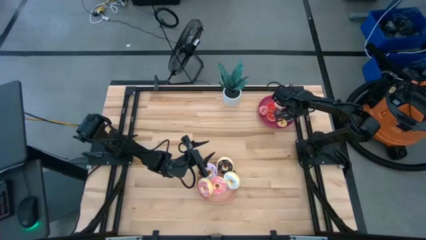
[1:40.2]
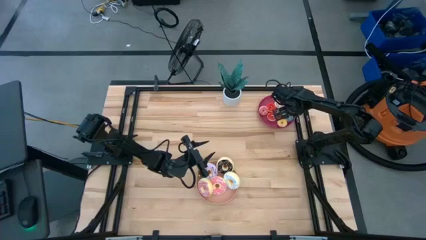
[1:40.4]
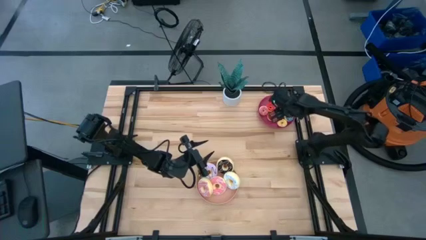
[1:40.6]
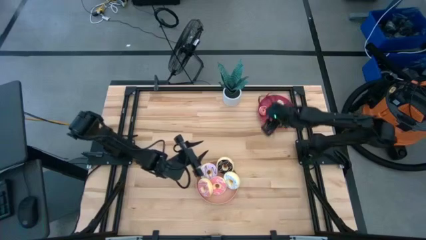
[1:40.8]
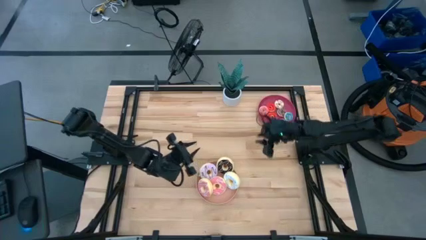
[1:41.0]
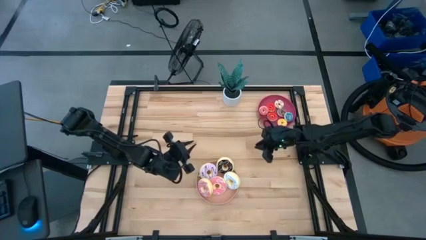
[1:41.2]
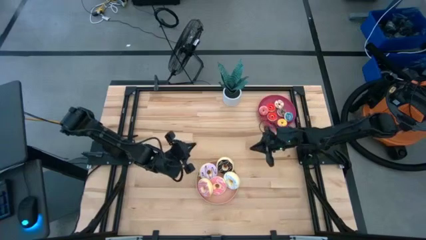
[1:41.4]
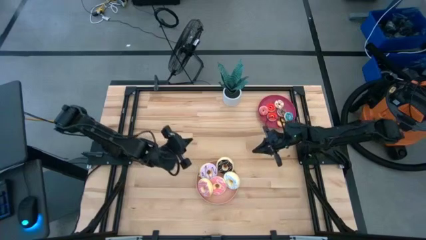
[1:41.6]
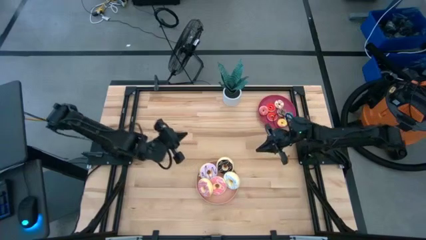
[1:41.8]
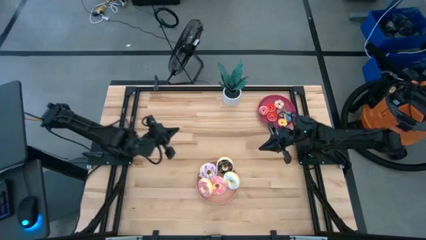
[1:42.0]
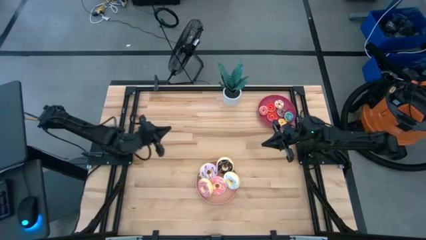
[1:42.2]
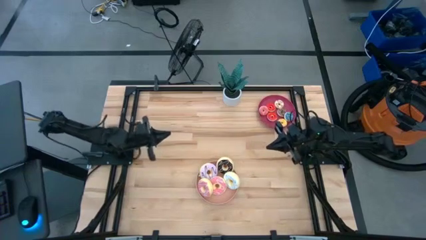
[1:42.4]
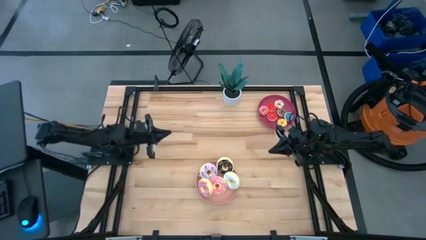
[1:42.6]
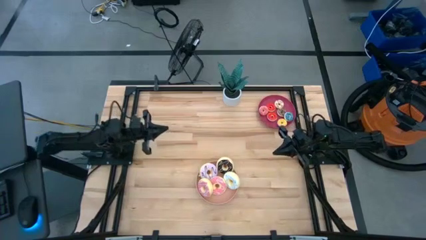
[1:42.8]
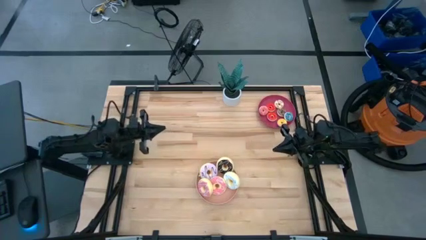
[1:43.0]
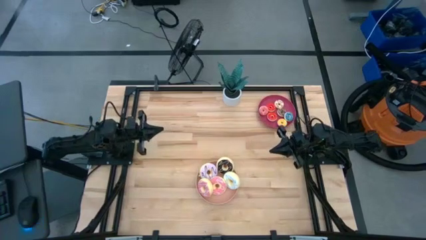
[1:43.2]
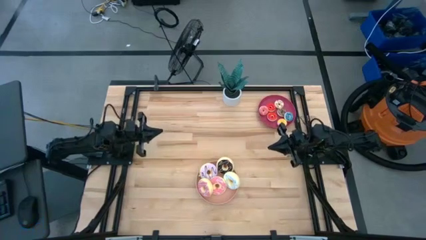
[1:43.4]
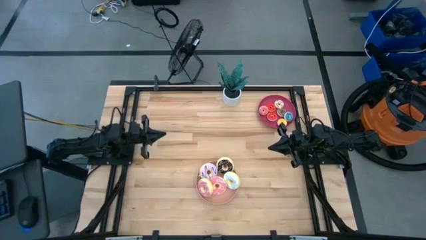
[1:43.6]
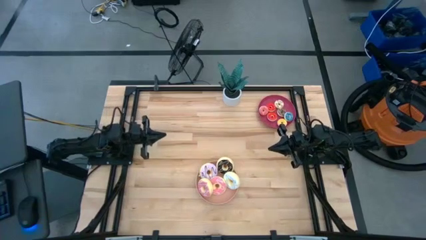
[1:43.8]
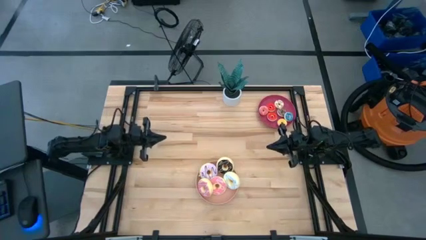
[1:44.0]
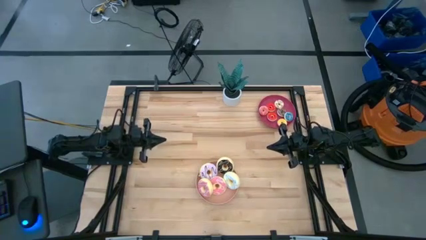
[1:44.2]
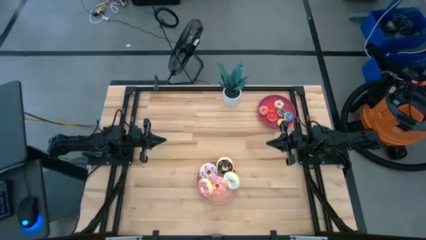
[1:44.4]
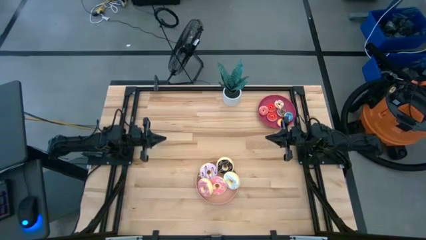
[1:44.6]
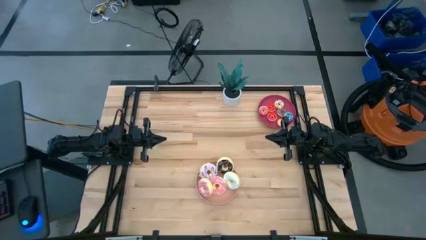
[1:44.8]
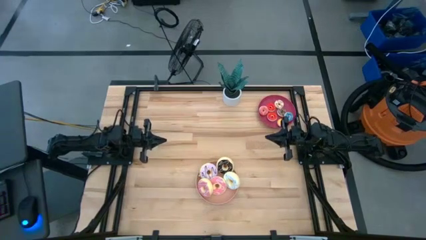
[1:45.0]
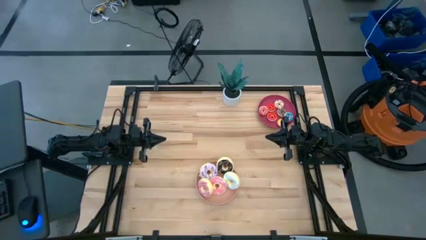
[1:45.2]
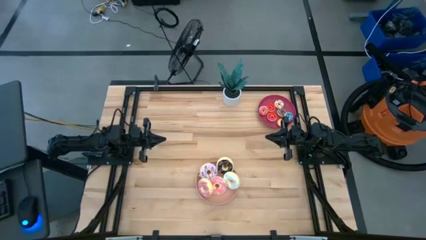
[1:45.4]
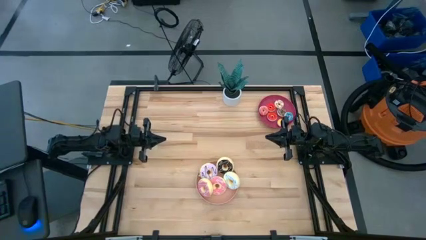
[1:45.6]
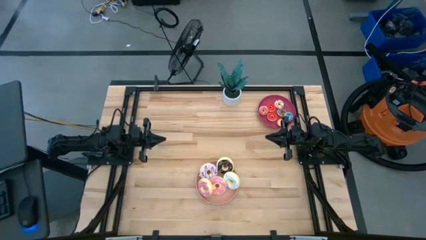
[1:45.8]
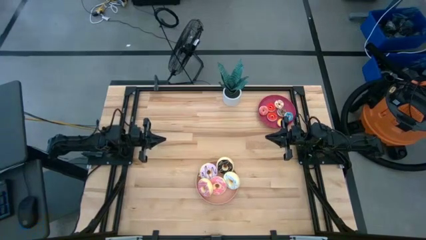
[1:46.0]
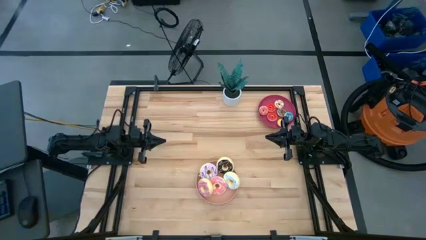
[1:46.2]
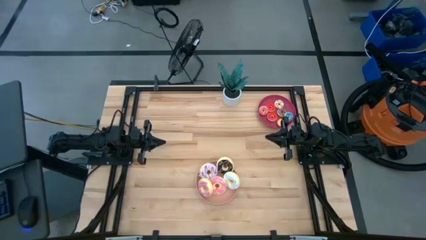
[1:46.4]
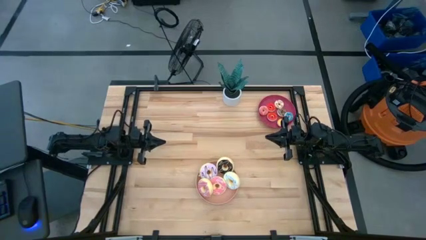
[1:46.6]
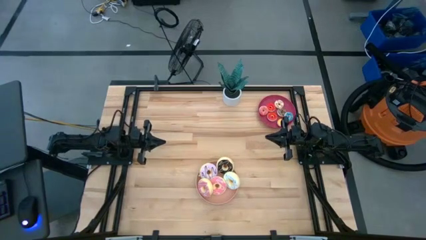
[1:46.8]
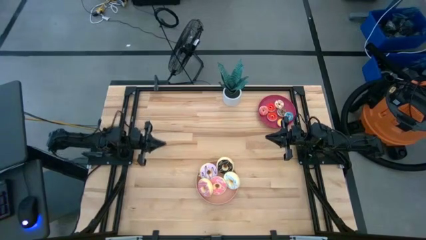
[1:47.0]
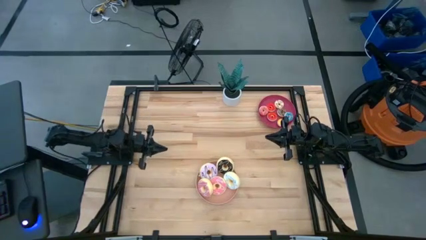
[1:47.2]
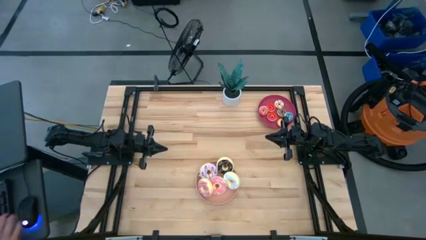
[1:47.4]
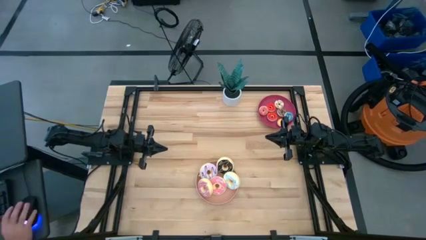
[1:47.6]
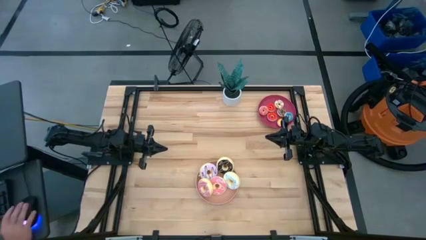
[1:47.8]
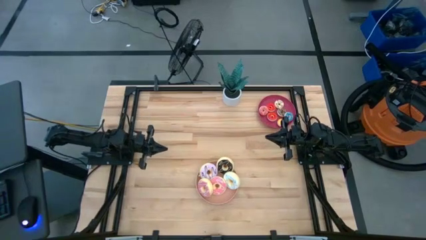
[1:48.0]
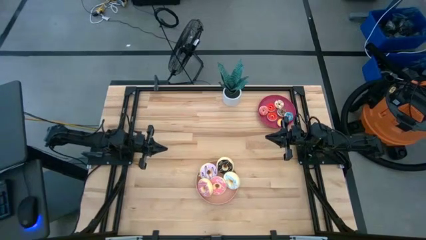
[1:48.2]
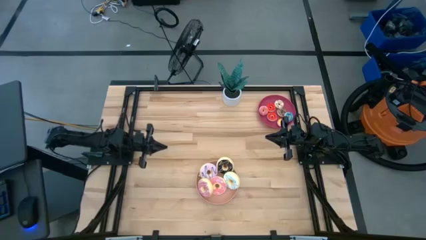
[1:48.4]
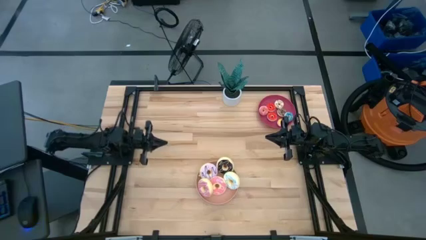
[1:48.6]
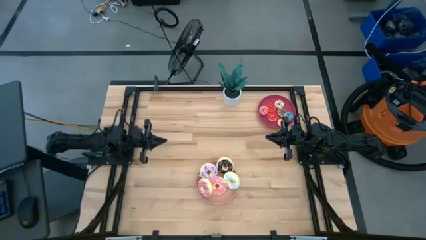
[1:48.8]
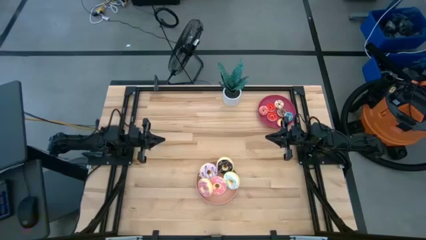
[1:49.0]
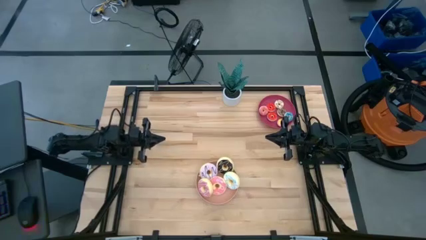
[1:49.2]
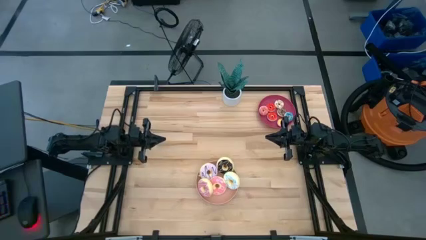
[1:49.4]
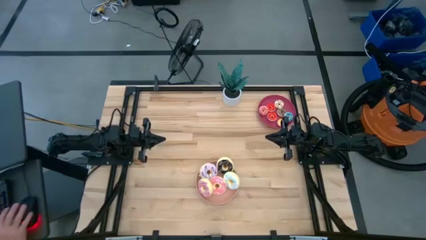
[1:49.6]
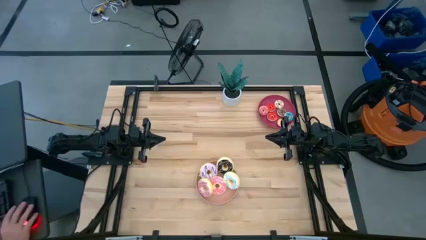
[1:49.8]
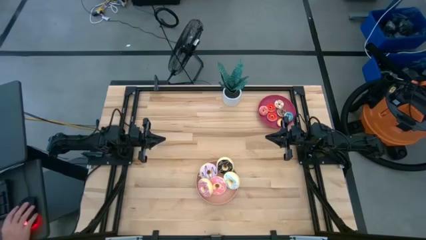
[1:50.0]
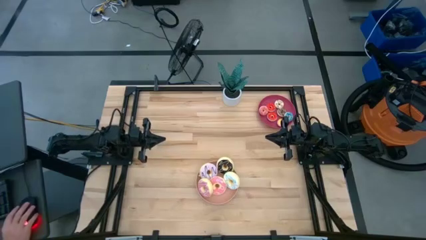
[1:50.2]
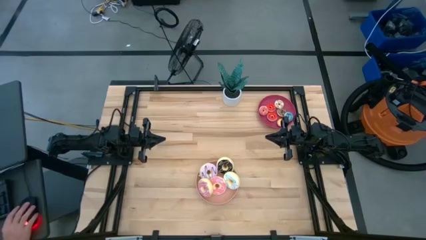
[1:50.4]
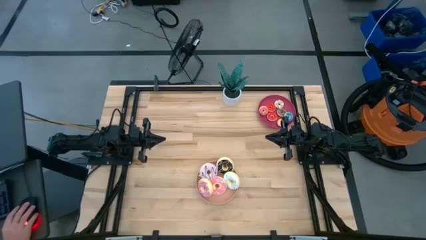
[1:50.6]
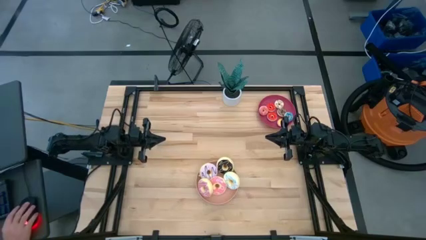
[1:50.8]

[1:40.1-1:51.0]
Task: Pick & Place donuts
Return to Home Position

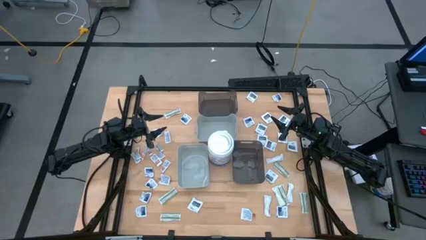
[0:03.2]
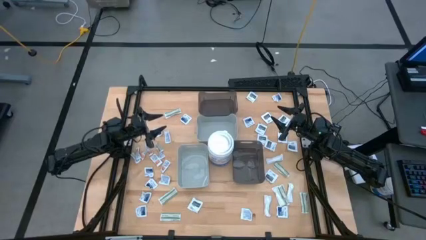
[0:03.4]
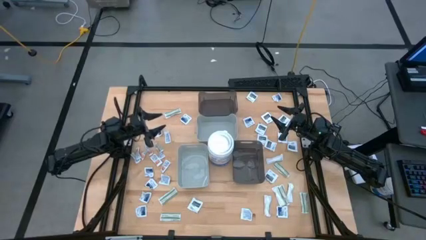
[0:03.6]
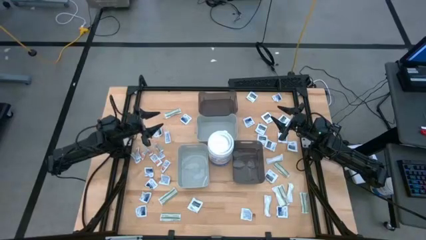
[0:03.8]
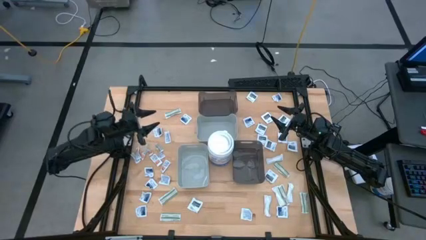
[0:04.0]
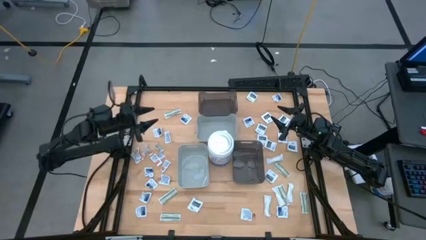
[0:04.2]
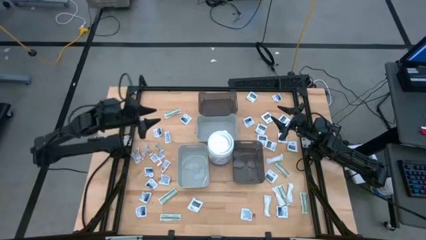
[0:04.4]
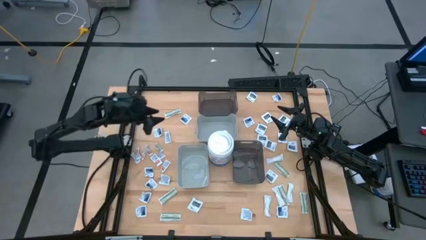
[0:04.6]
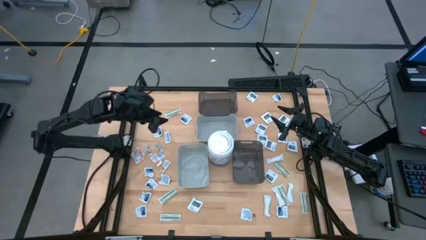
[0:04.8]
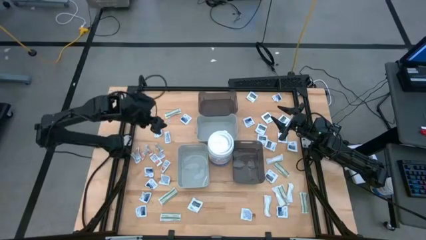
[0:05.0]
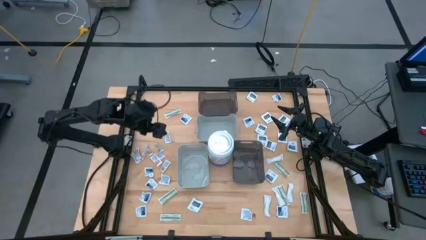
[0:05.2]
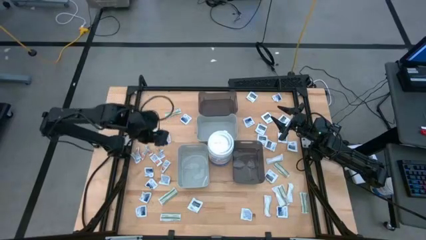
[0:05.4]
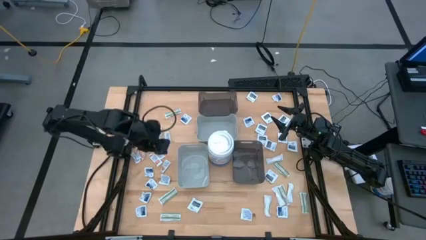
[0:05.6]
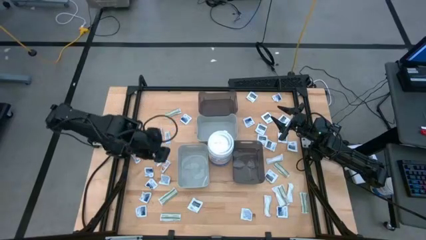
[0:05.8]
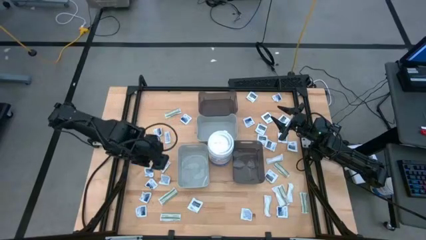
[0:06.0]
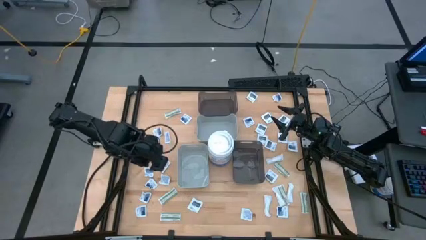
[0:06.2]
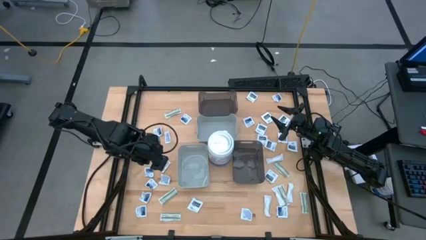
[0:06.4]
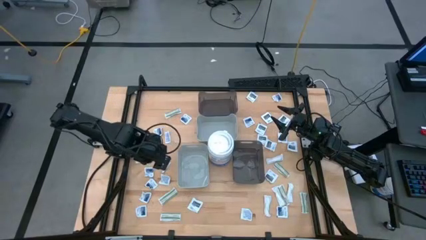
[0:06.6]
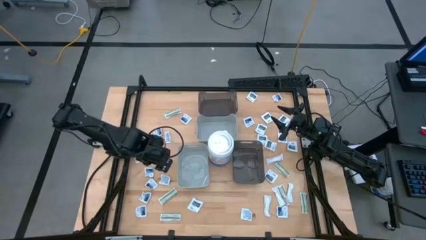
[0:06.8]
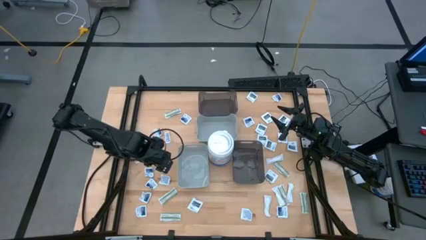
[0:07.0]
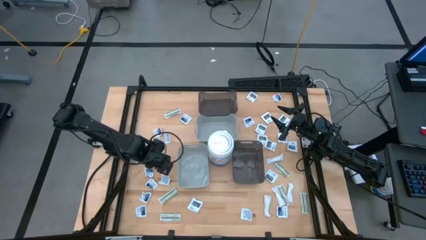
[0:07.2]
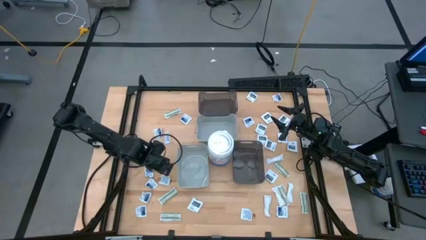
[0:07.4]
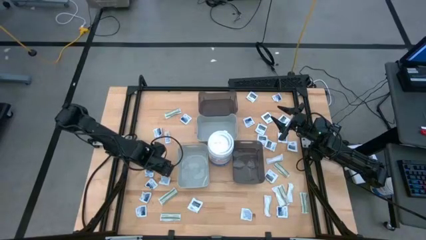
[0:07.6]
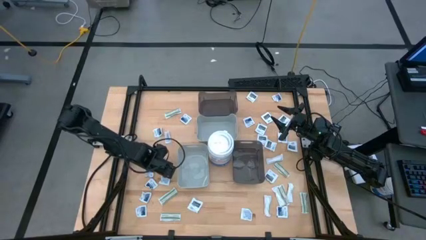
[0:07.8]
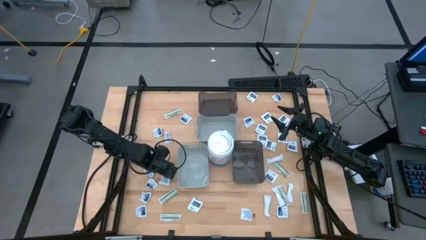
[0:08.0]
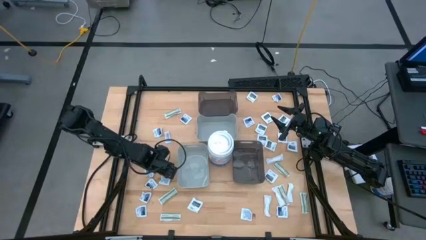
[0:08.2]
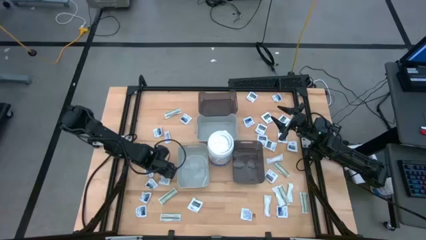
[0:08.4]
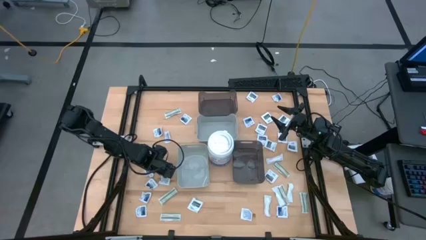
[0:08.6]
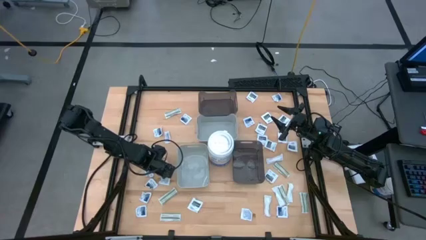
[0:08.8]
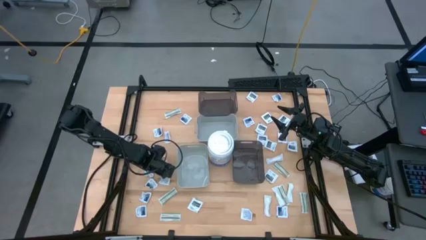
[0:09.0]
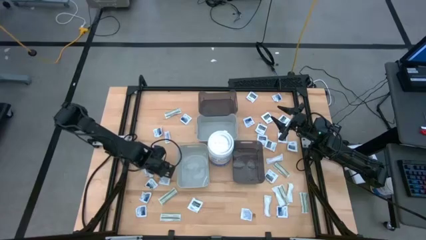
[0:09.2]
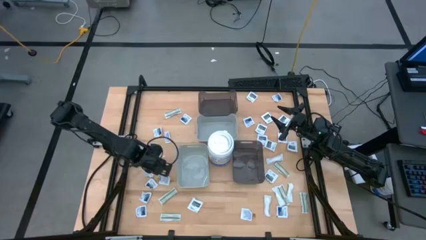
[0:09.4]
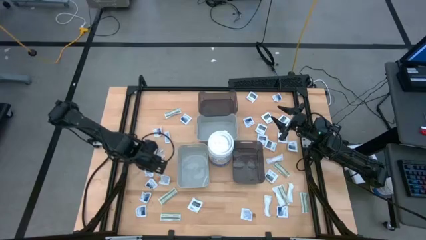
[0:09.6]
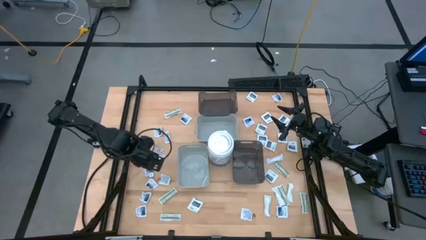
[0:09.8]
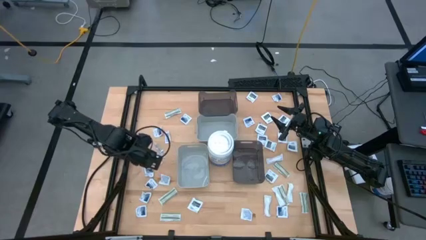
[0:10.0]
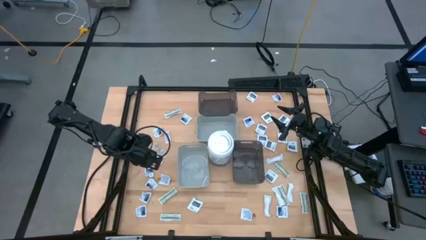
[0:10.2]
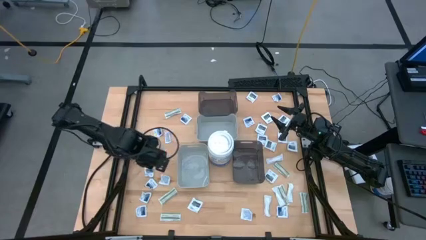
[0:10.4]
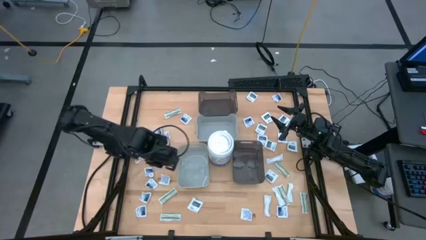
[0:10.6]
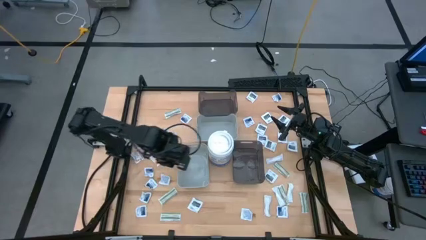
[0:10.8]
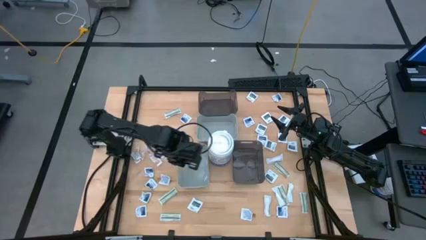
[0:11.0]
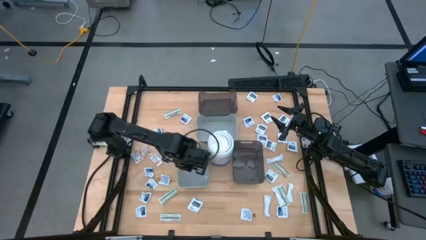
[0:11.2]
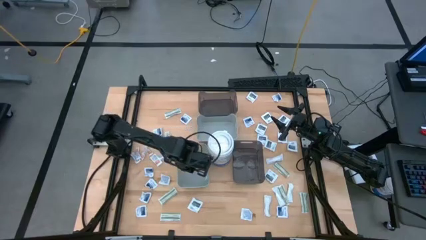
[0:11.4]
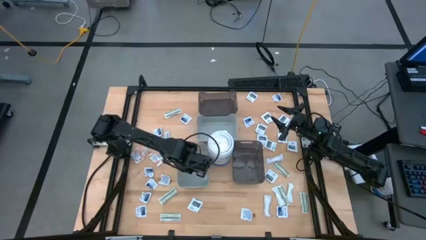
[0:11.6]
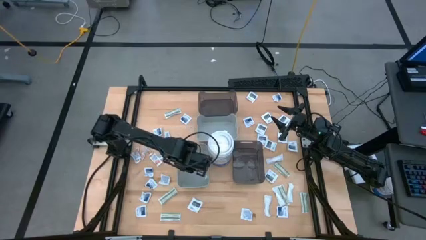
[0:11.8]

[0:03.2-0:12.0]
Task: Pick & Place First Aid Supplies
Put the ointment pack into the bottom gray bin
